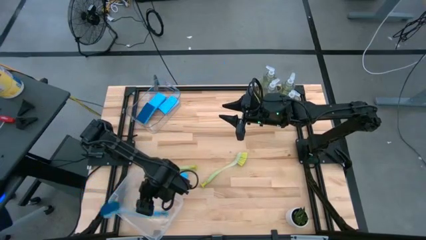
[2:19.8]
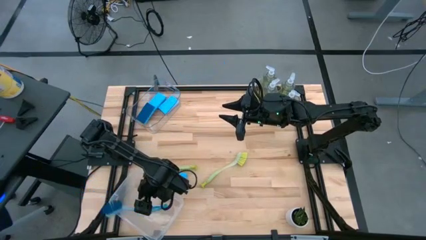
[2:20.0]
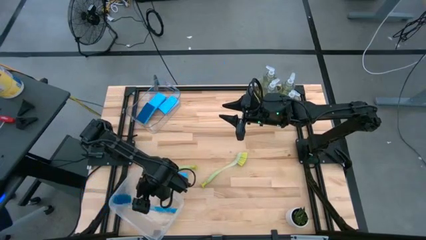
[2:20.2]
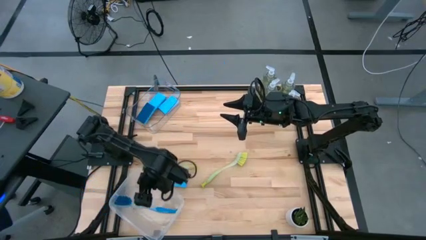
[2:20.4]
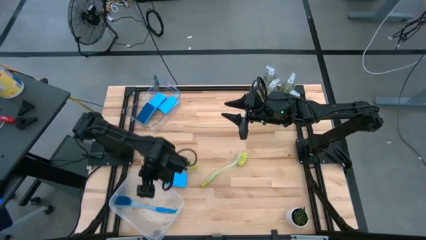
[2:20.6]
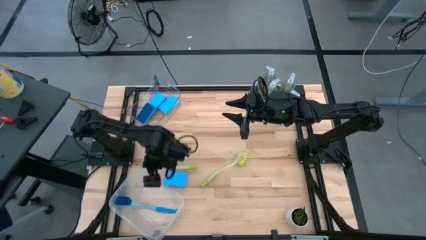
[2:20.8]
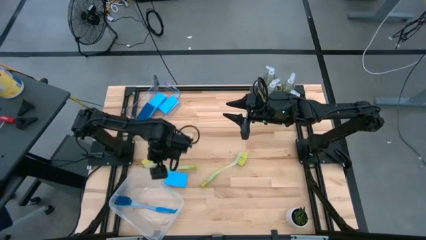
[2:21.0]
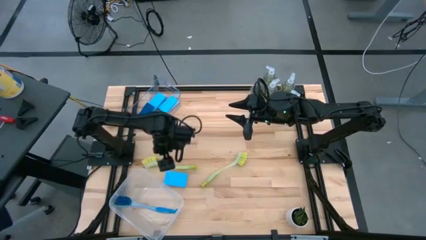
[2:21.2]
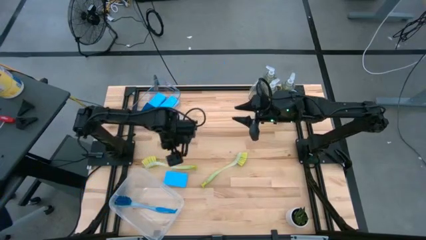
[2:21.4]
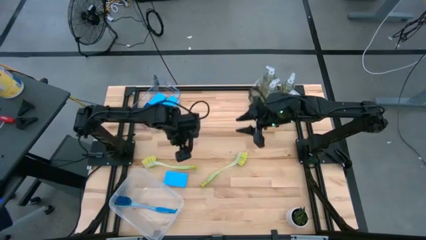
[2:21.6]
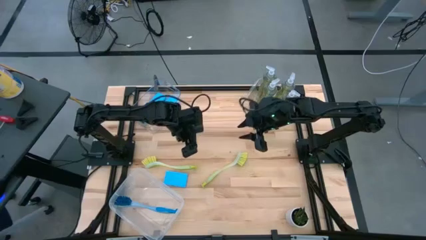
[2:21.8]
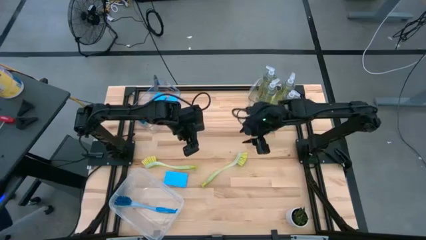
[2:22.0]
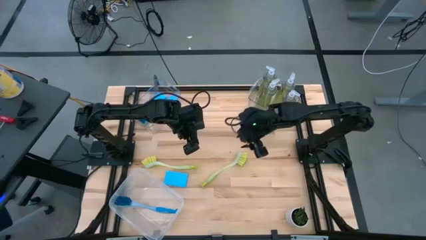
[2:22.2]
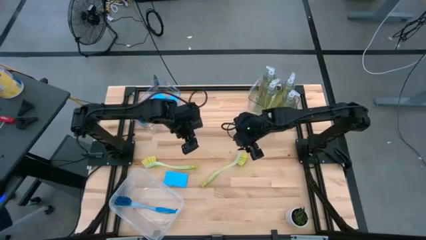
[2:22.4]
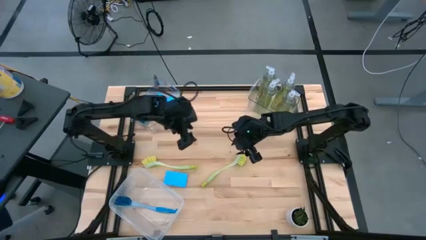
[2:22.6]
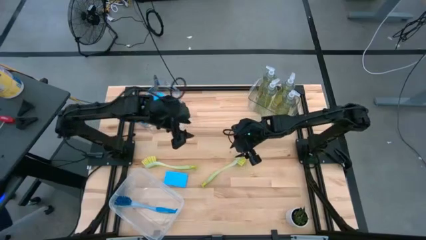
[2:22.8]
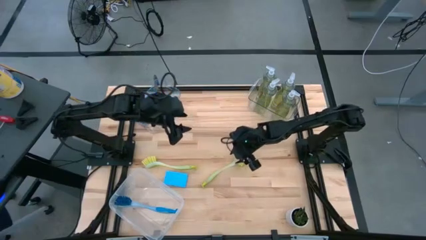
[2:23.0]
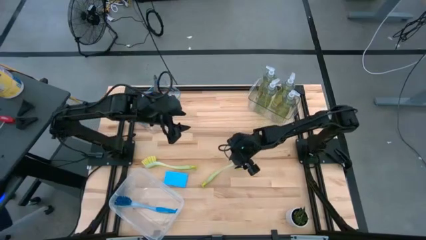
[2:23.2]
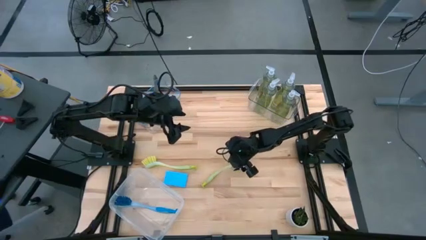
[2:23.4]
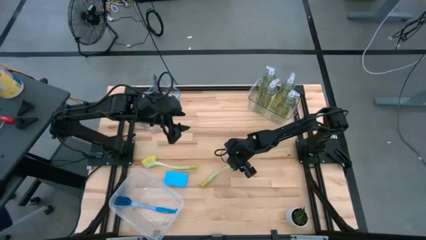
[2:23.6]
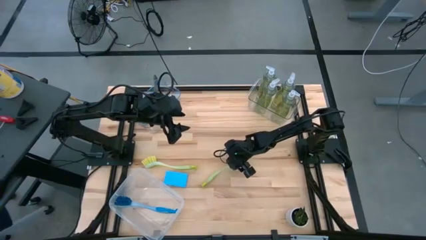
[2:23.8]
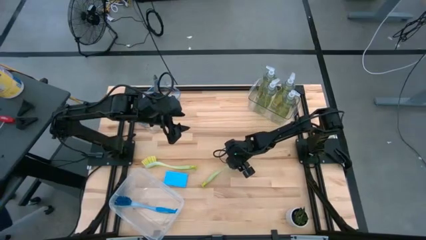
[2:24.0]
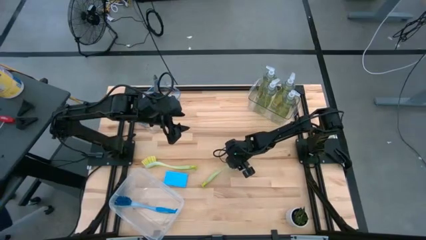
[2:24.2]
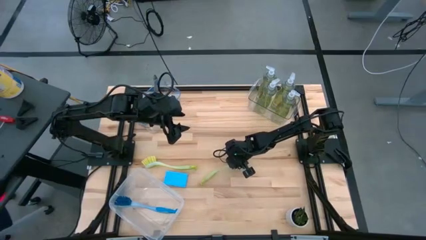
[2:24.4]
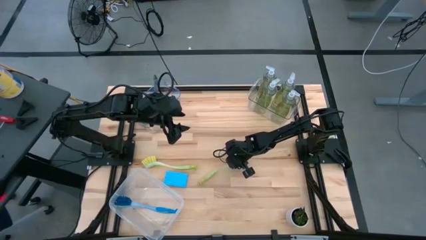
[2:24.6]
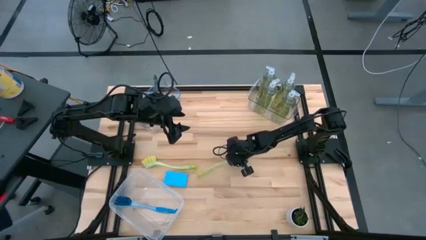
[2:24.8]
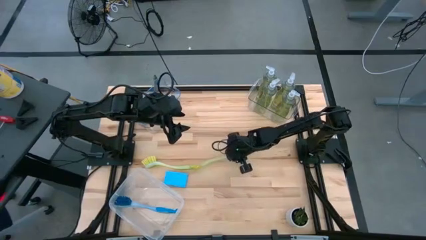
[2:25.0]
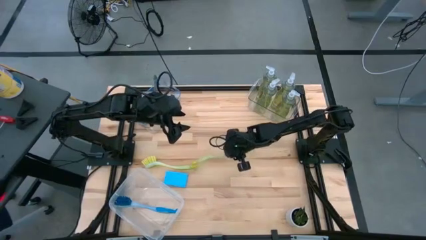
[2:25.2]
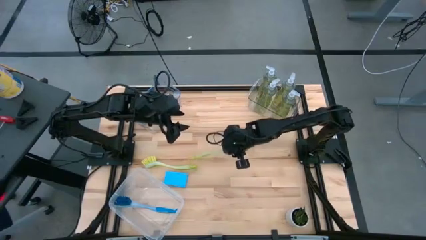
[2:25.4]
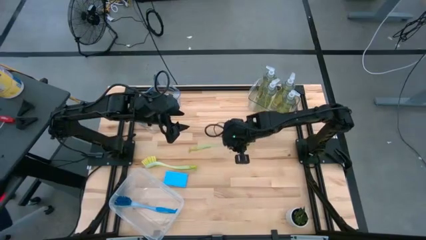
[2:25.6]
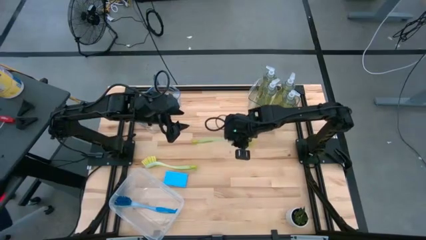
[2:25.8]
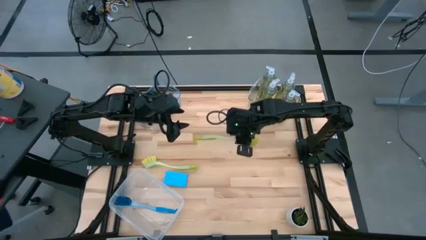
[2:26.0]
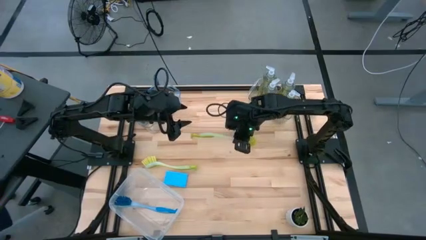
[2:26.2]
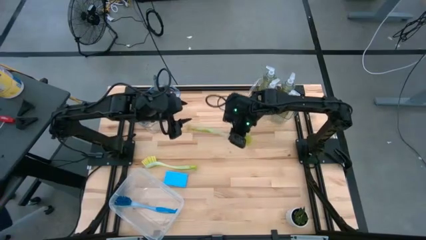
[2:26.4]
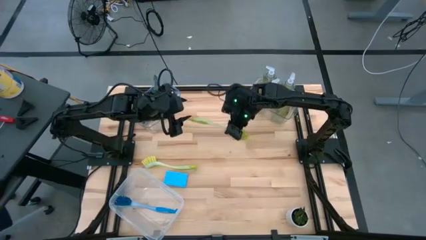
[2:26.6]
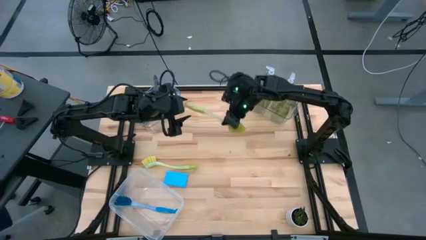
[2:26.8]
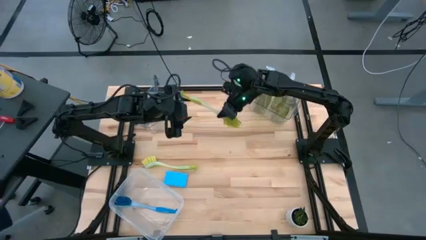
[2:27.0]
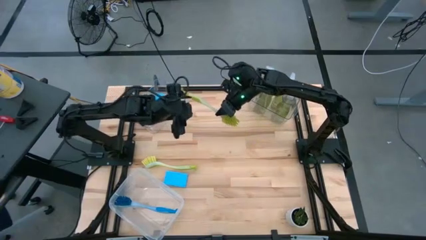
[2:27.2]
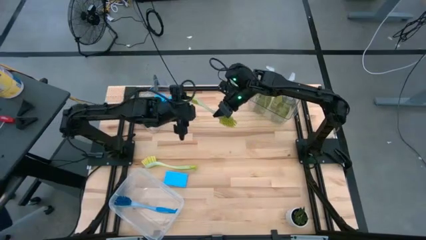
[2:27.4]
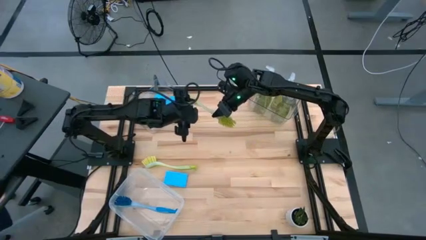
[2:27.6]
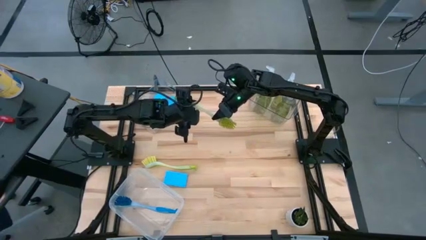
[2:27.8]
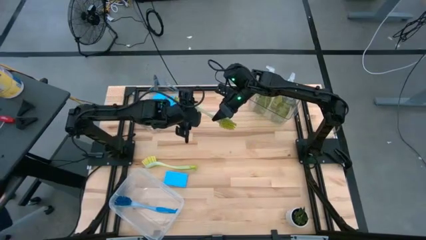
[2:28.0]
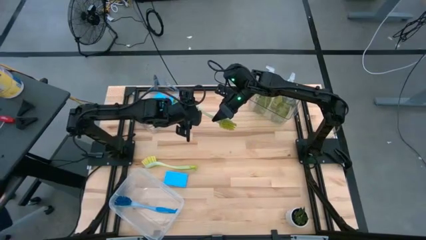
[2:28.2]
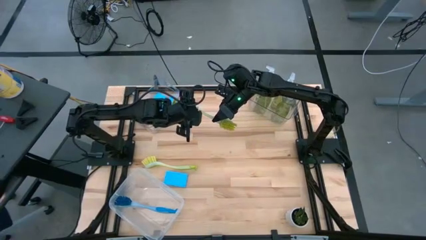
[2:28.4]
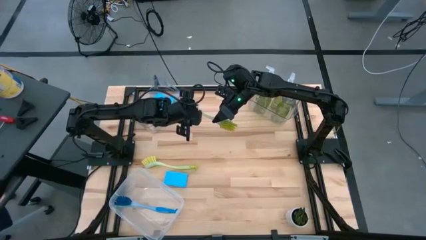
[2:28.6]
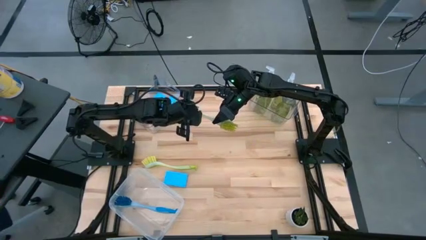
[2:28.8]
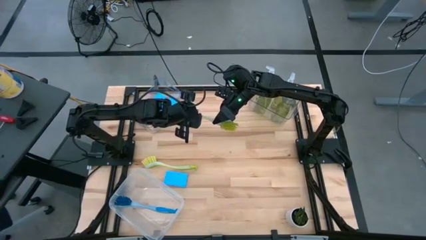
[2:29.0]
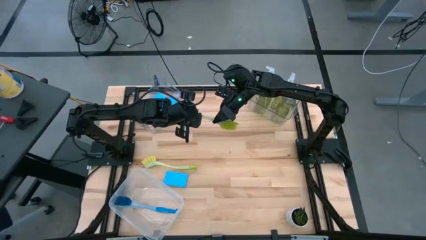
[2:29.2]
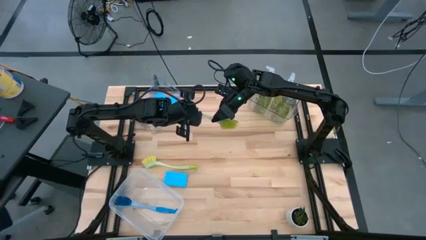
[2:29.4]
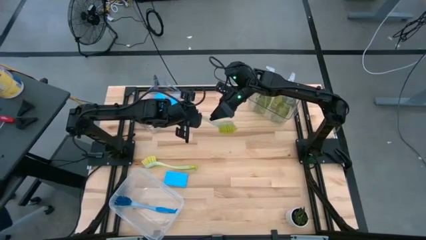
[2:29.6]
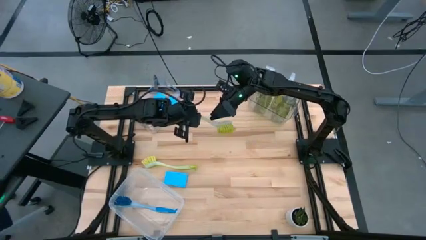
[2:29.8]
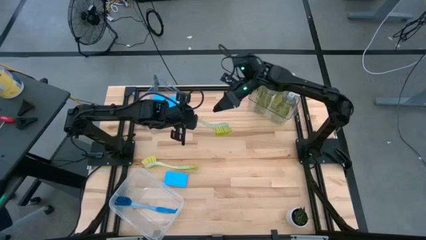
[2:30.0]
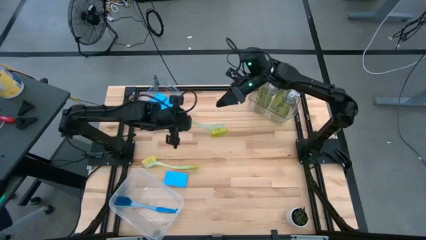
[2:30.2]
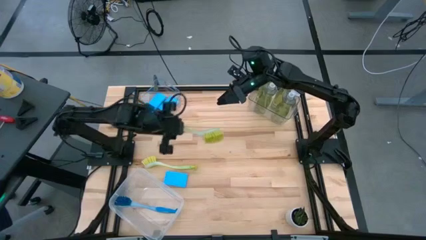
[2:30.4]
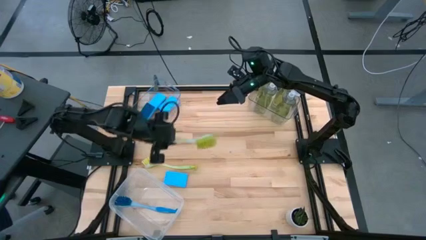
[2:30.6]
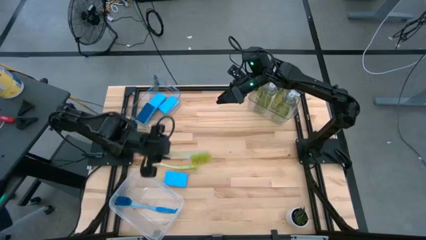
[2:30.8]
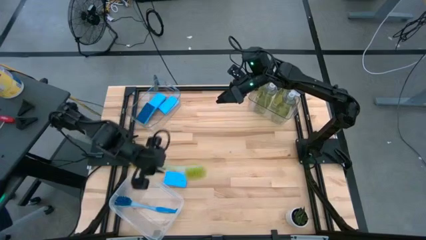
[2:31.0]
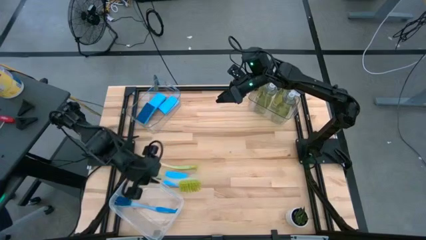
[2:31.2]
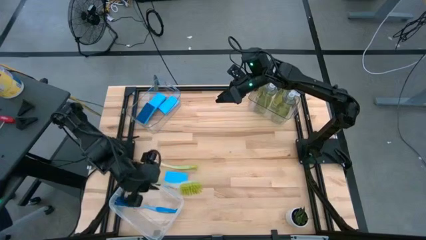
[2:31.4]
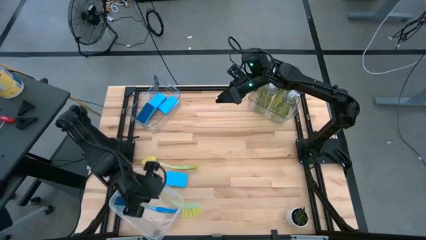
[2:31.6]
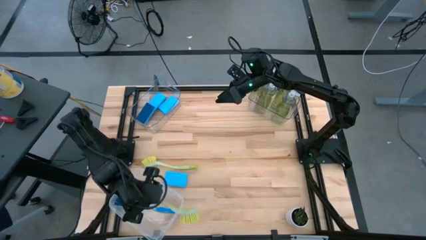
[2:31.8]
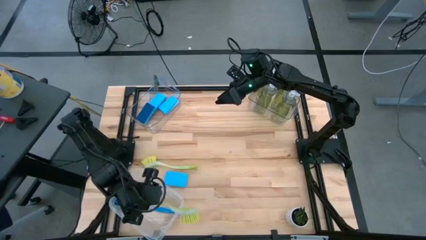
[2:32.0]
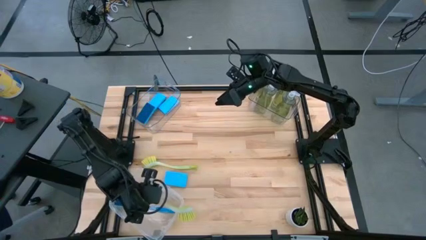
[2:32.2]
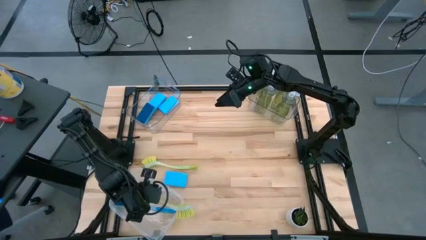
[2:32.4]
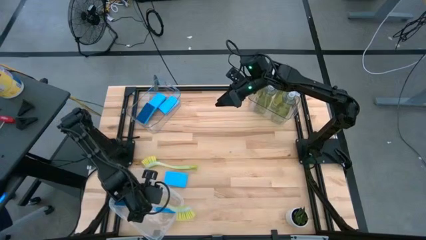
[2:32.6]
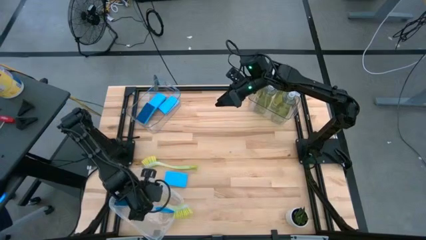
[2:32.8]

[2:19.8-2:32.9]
Task: Pick & Place Kitchen Sink Supplies
Put the yellow dish brush into the white bin

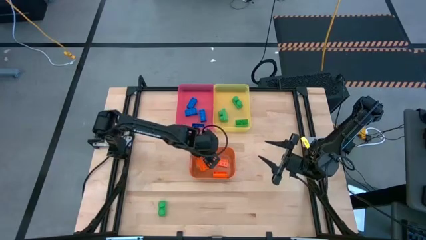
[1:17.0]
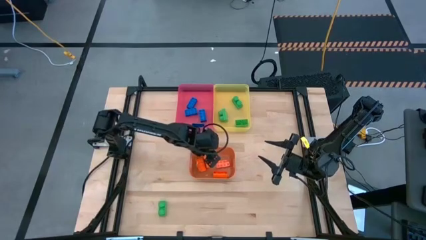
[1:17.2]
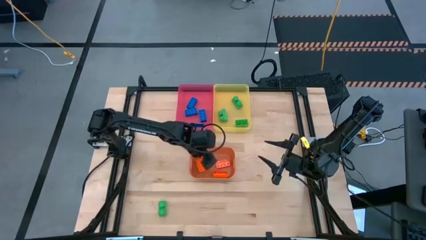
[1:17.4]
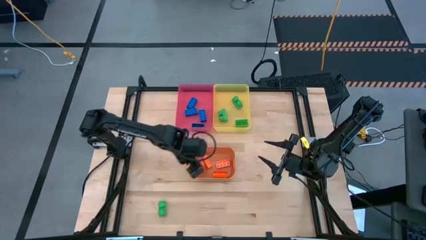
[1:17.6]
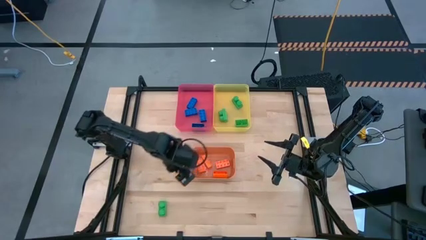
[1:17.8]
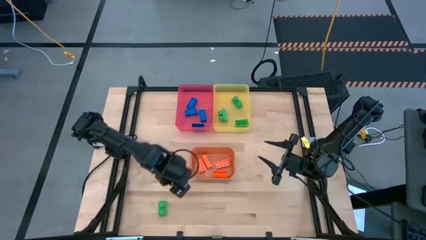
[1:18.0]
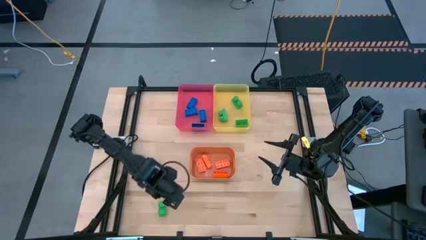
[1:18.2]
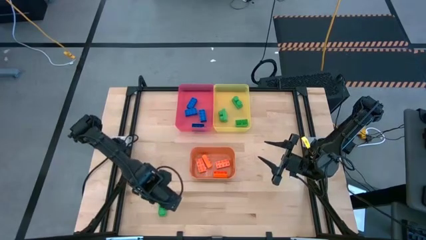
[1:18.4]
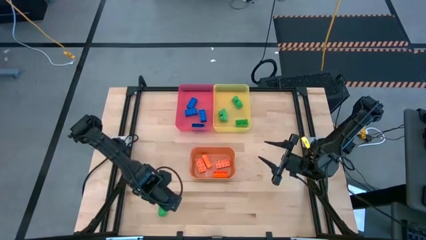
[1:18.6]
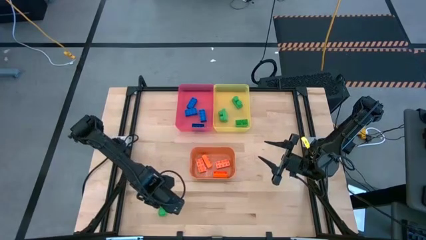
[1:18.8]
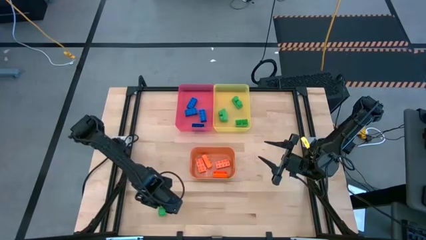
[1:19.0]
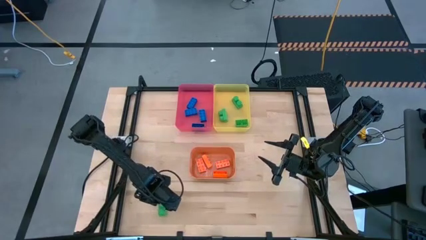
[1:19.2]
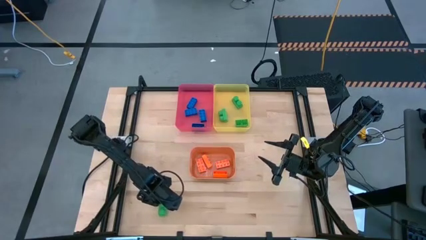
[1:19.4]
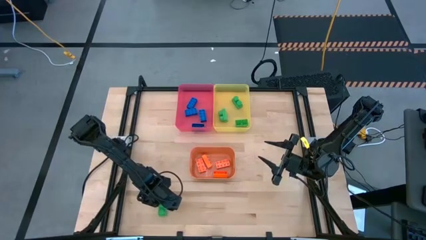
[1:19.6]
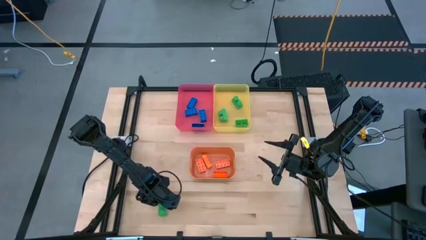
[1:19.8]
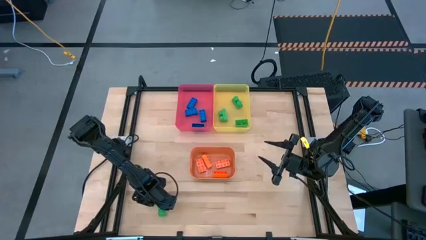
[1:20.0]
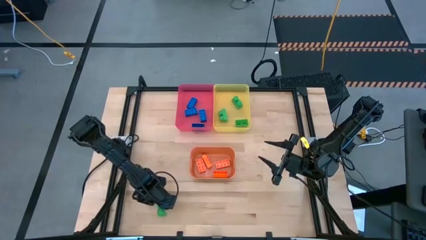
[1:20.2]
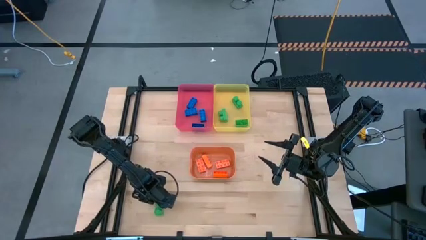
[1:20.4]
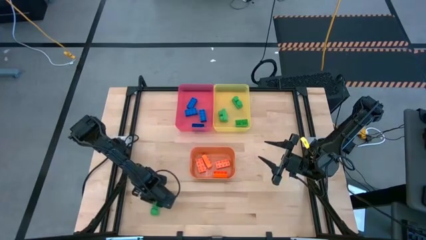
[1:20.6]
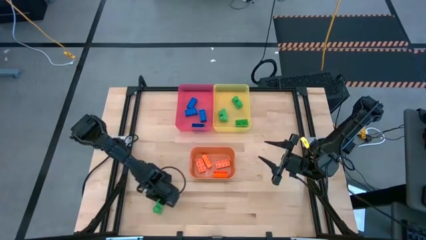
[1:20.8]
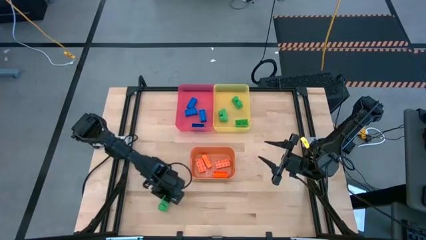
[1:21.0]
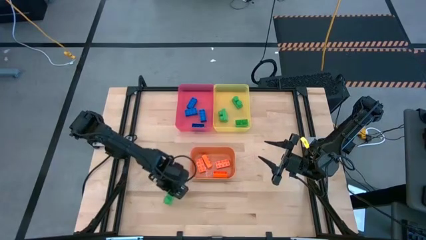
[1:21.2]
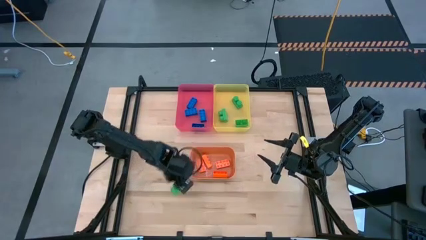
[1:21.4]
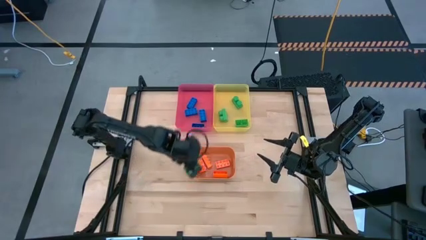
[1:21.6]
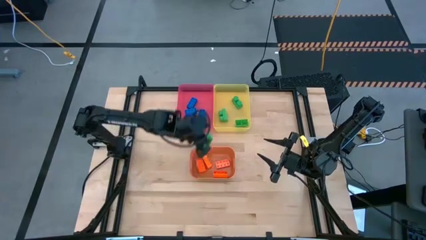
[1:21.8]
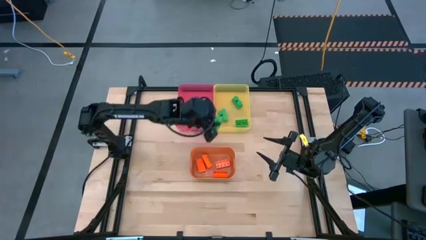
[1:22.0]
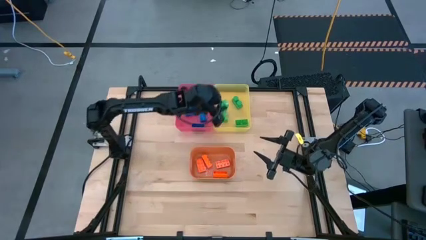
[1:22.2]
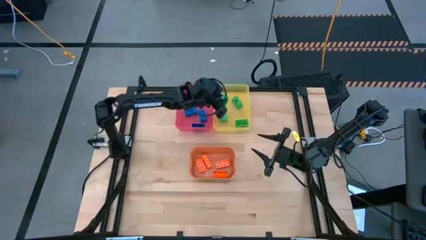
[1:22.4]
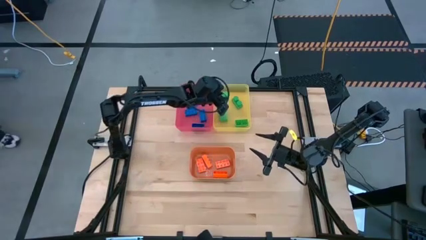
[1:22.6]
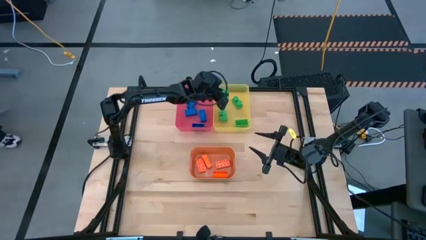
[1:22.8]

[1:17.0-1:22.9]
Task: Sort & place blocks by color
Put the green game piece into the yellow bin
